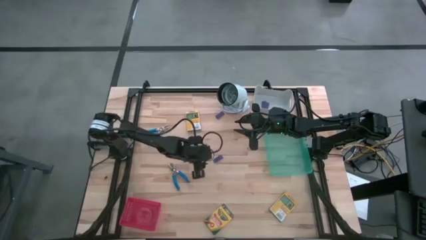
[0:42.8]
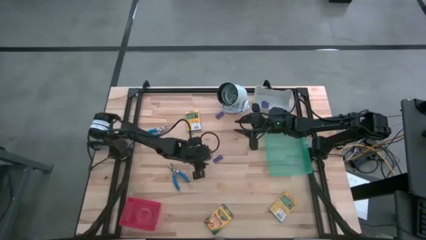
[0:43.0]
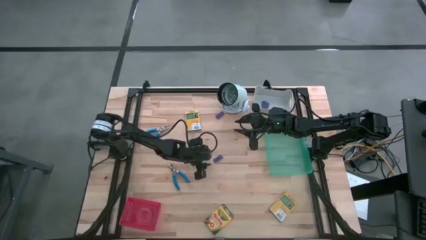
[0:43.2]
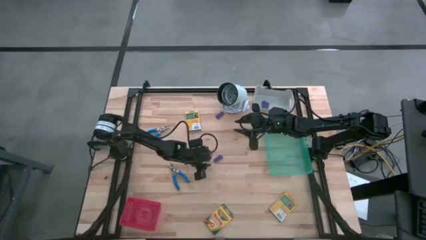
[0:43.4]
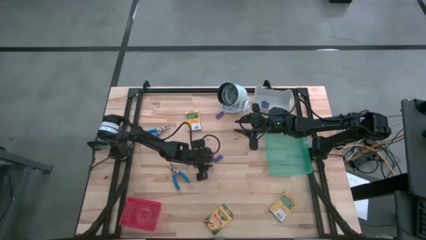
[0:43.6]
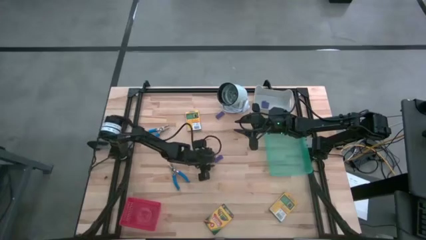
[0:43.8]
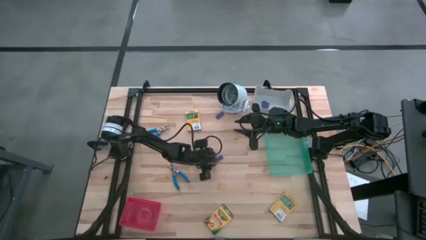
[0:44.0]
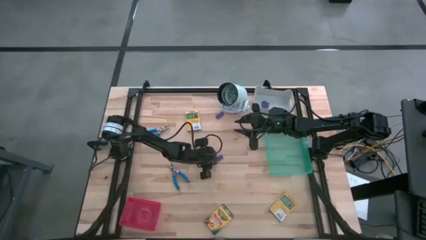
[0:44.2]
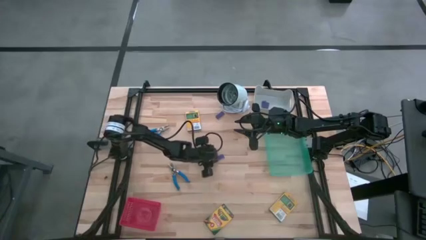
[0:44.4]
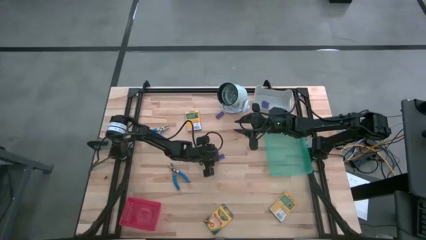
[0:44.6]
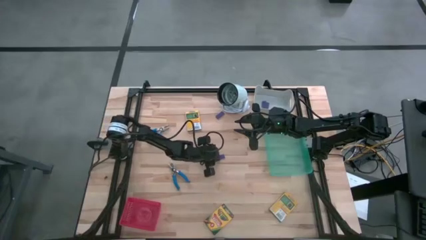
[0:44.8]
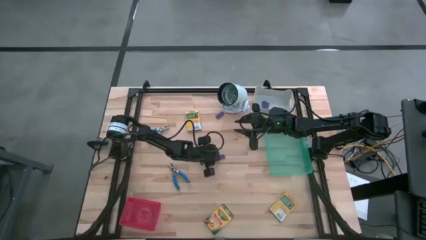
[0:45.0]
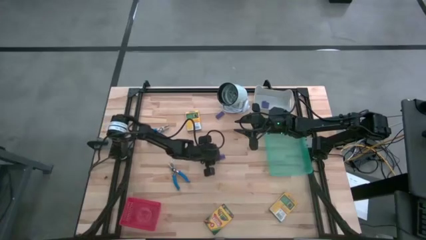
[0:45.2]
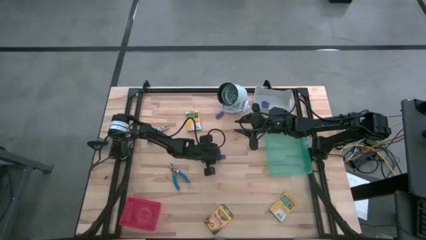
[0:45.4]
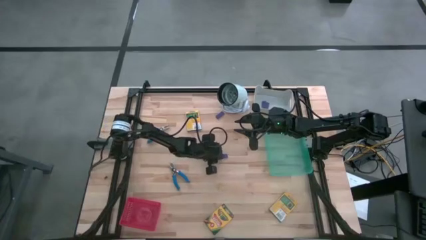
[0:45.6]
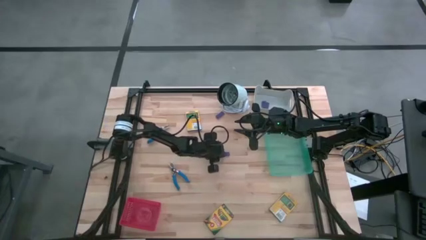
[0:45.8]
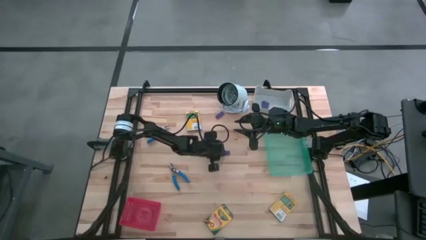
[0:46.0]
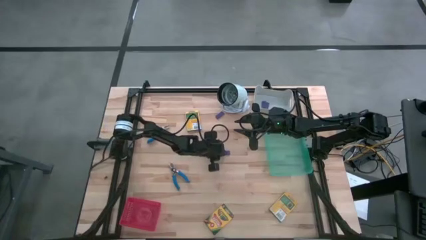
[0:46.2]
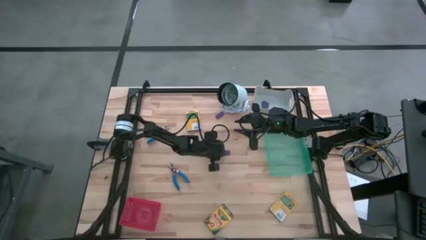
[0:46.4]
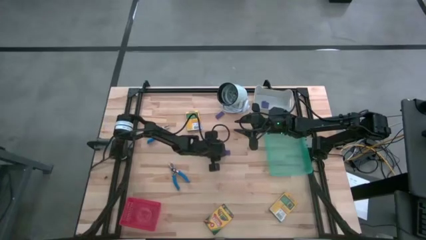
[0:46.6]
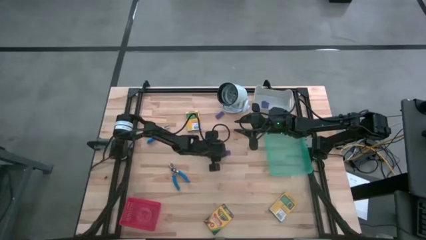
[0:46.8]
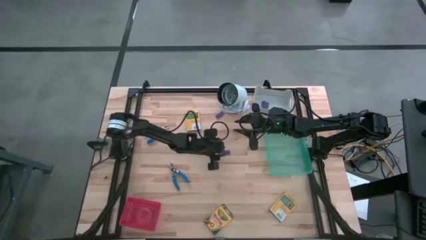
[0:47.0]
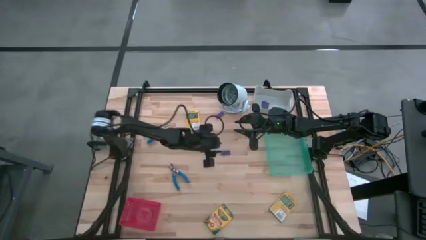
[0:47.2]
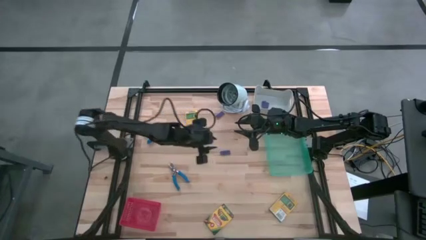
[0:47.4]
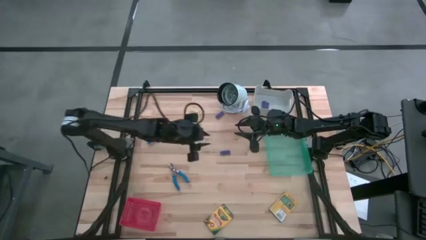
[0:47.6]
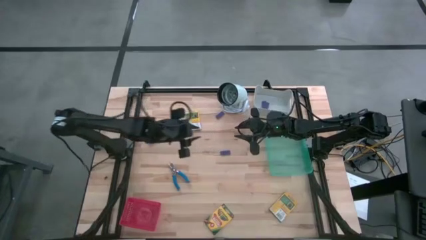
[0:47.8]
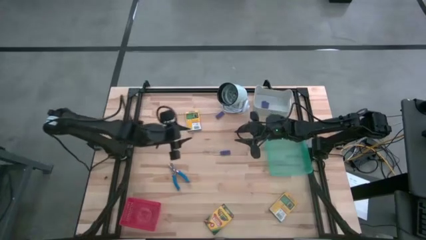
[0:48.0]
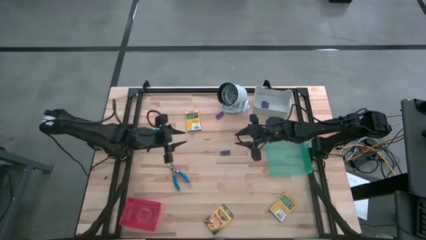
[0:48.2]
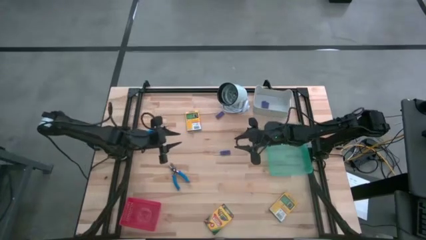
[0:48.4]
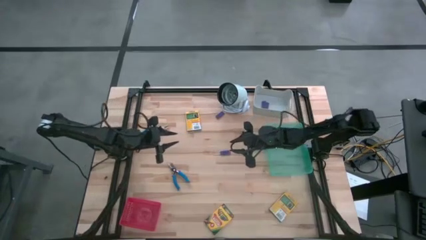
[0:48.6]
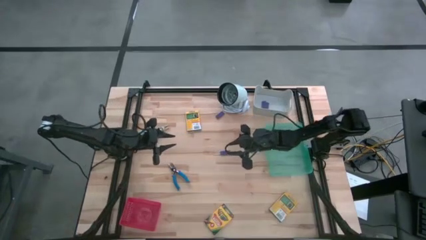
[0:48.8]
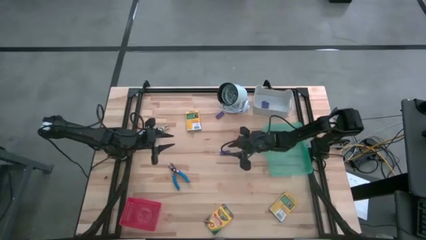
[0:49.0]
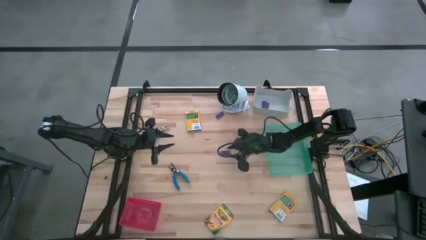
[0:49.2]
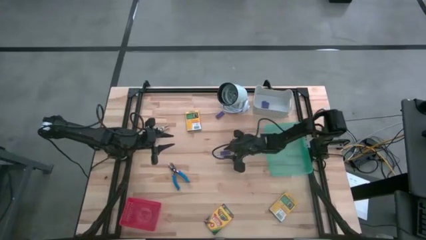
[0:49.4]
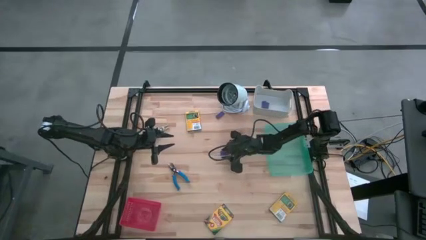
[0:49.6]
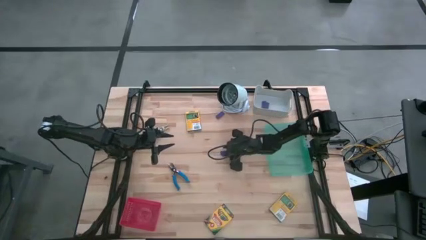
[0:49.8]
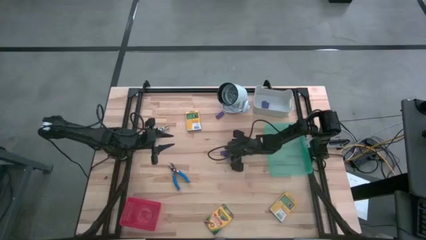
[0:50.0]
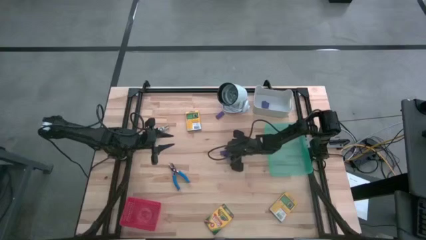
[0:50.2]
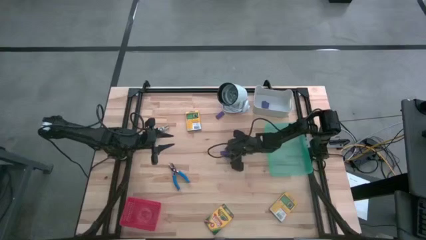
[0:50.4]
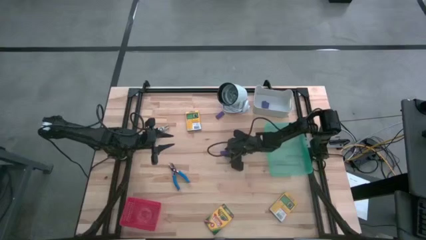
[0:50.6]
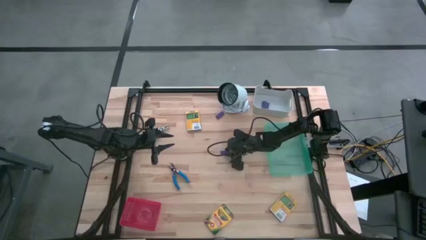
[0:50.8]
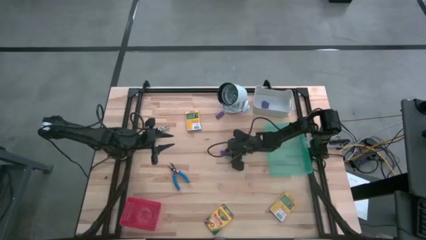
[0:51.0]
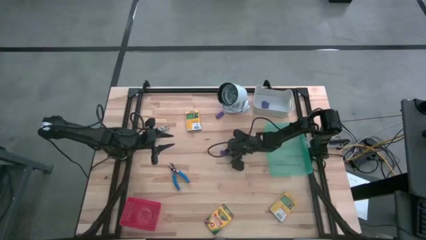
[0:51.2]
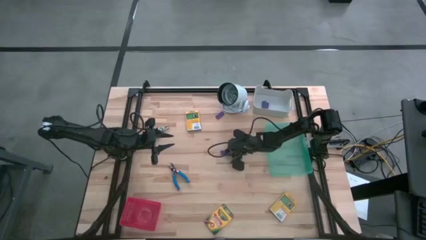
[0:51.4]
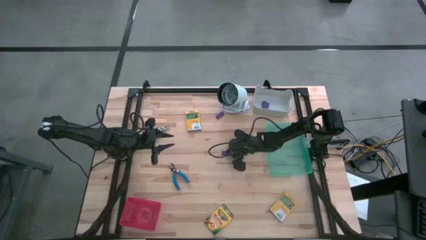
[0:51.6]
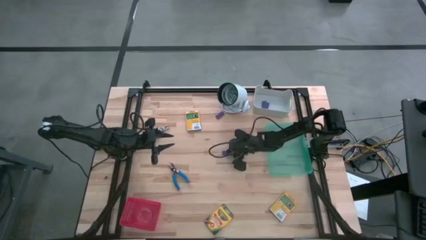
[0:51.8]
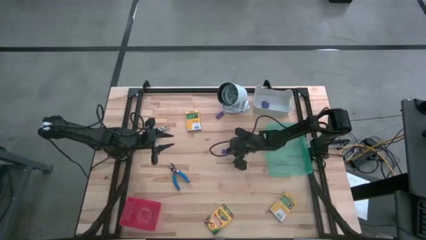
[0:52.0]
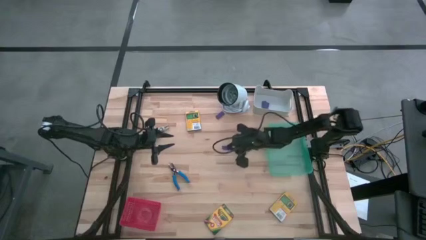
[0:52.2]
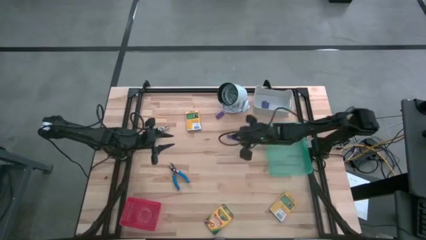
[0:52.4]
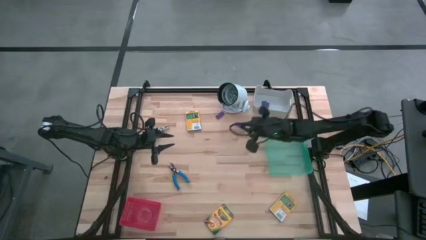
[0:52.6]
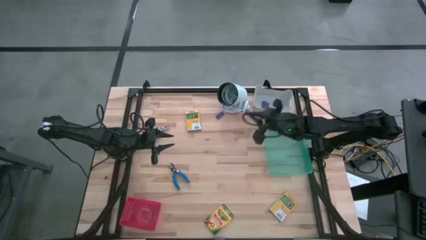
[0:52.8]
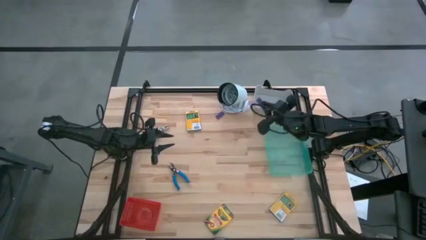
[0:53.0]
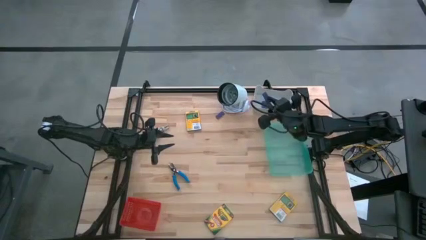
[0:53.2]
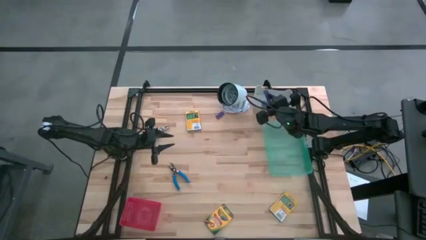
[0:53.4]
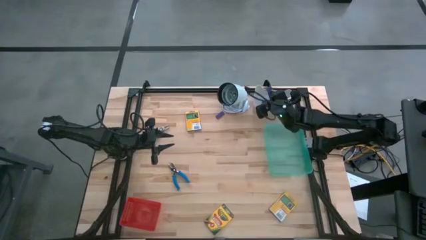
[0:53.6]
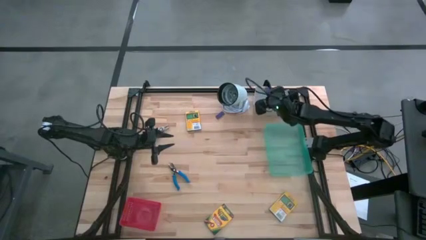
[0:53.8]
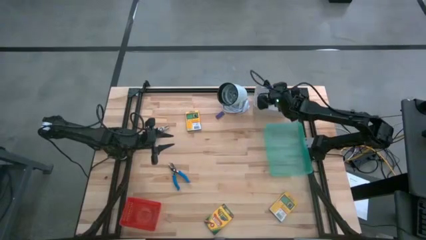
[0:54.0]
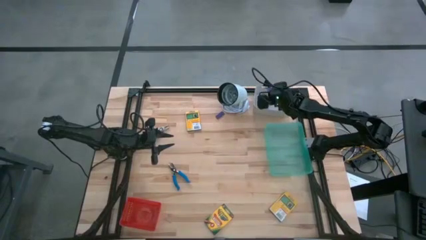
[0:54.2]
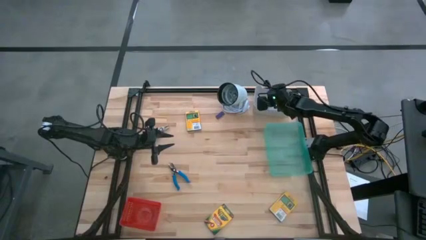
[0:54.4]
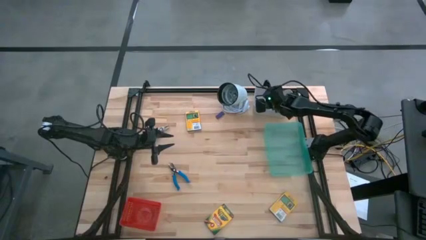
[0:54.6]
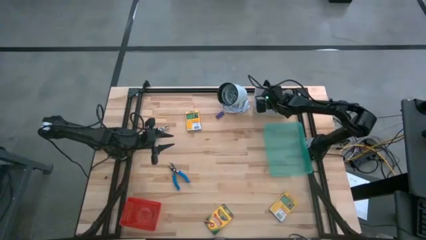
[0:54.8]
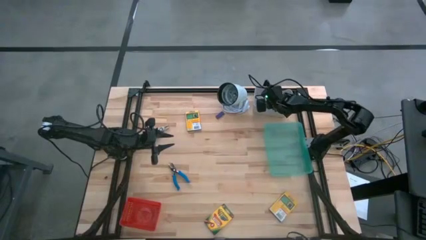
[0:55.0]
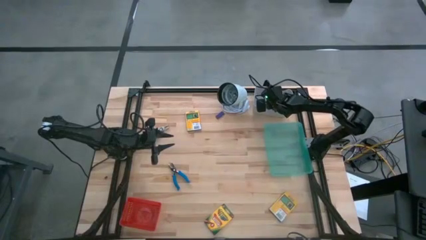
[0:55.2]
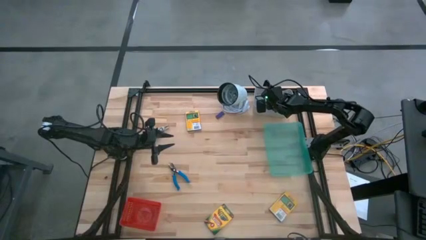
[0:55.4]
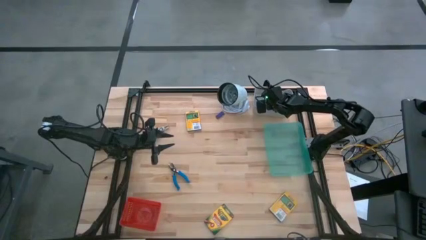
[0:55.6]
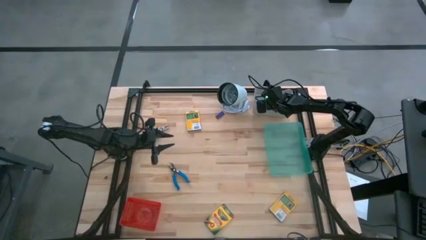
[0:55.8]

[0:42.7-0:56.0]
Task: Pick & Place School Supplies
Put the blue eraser into the gray bin
